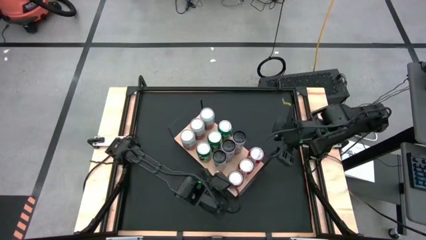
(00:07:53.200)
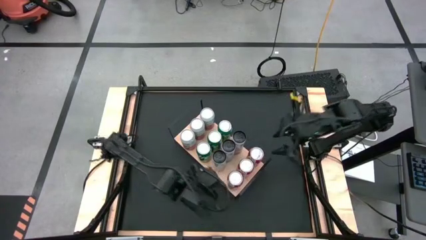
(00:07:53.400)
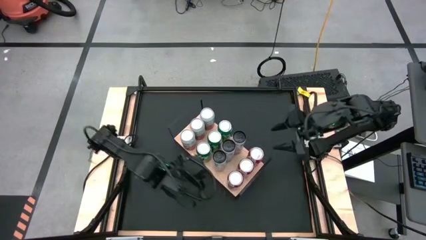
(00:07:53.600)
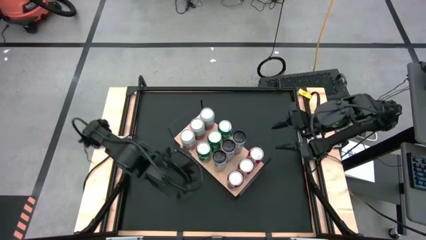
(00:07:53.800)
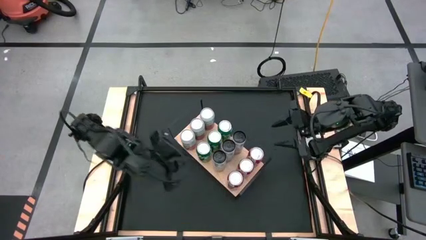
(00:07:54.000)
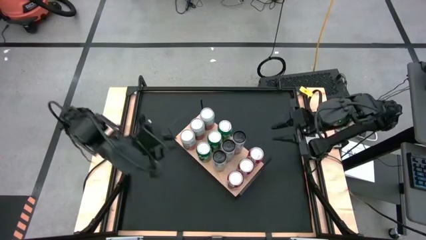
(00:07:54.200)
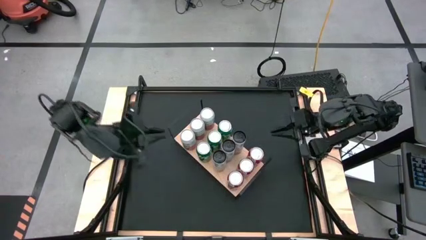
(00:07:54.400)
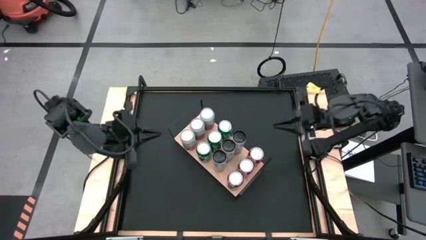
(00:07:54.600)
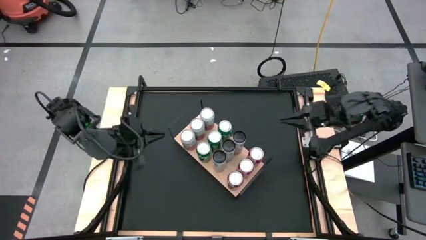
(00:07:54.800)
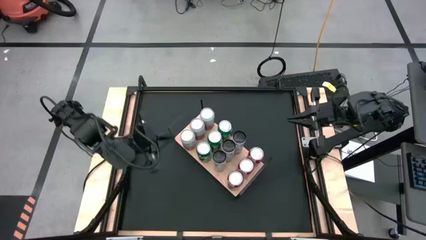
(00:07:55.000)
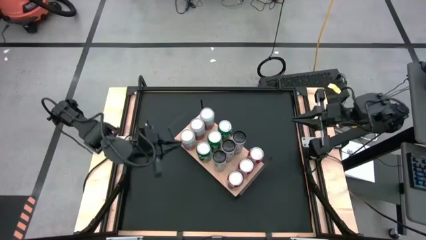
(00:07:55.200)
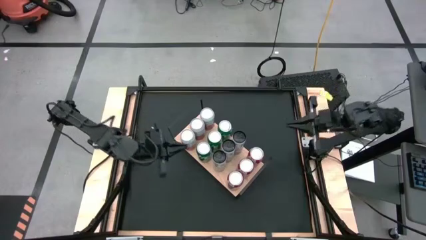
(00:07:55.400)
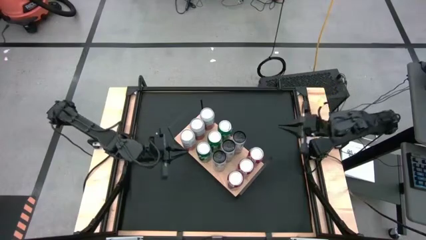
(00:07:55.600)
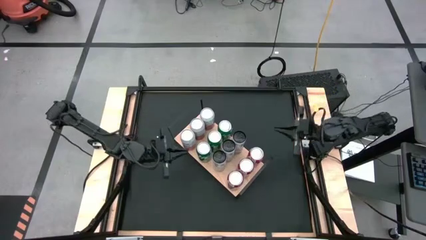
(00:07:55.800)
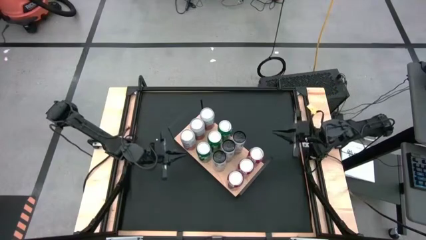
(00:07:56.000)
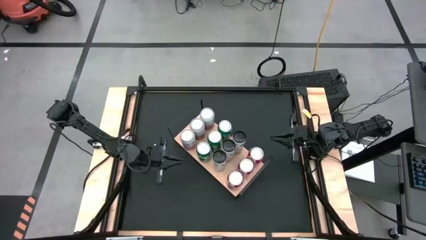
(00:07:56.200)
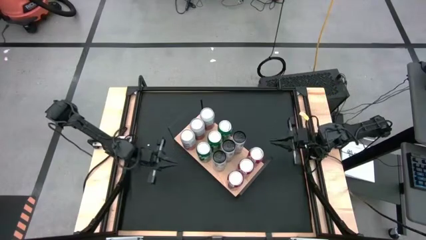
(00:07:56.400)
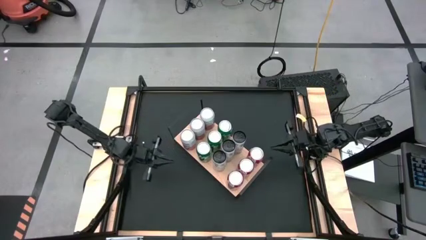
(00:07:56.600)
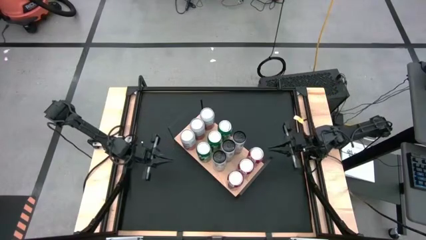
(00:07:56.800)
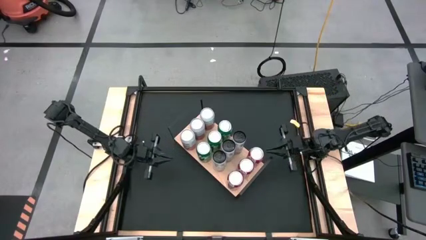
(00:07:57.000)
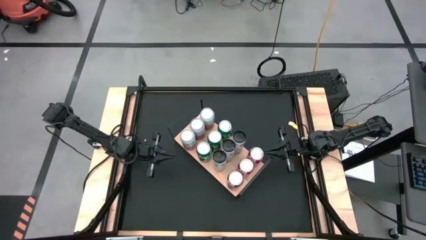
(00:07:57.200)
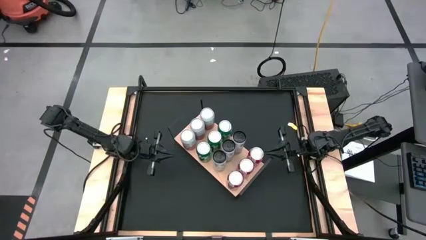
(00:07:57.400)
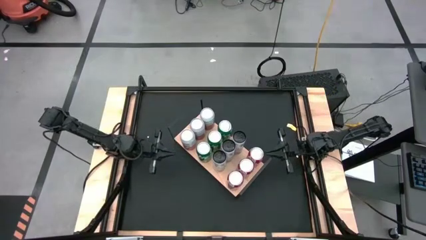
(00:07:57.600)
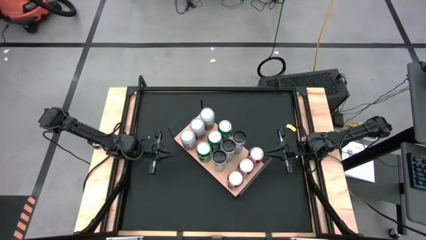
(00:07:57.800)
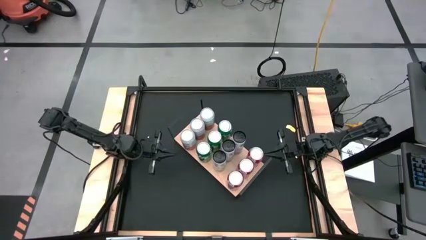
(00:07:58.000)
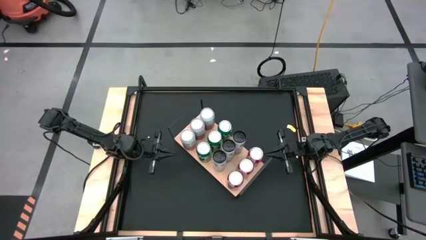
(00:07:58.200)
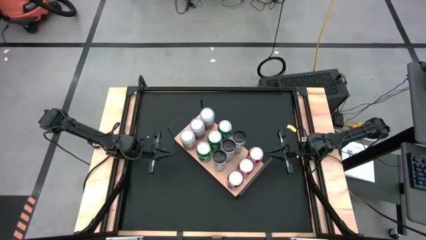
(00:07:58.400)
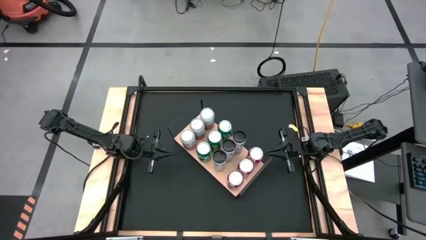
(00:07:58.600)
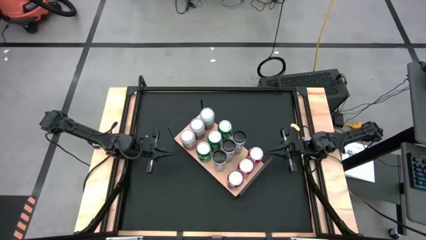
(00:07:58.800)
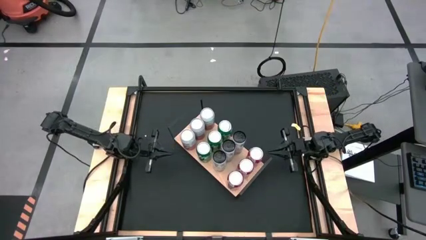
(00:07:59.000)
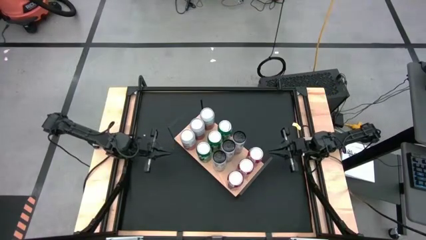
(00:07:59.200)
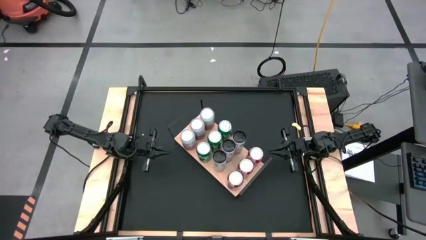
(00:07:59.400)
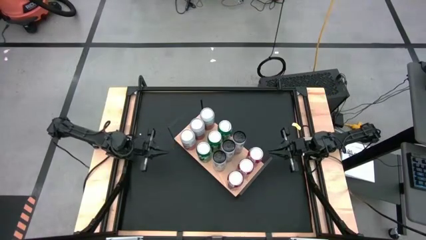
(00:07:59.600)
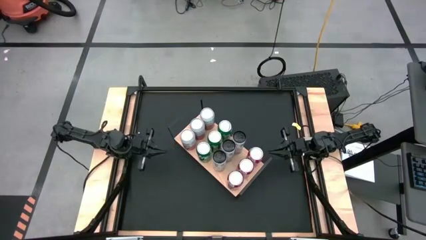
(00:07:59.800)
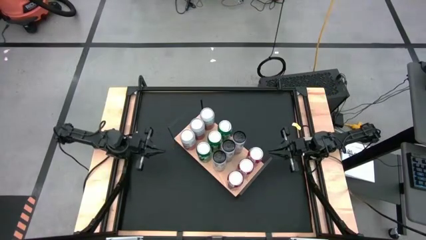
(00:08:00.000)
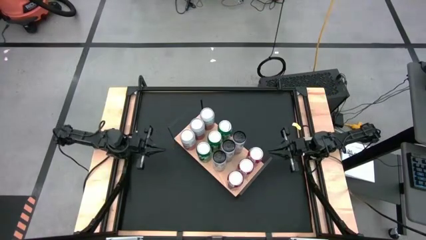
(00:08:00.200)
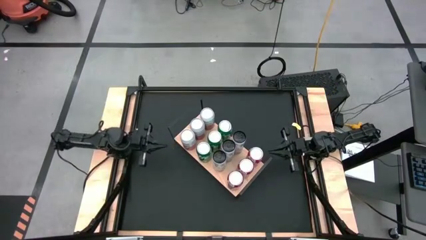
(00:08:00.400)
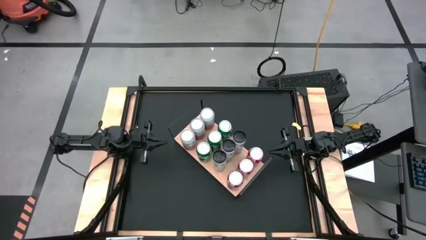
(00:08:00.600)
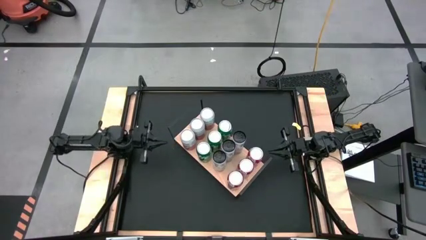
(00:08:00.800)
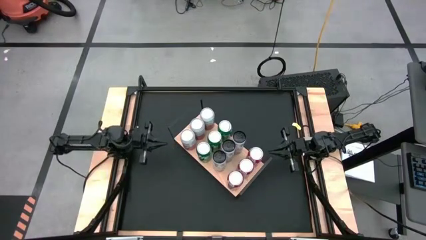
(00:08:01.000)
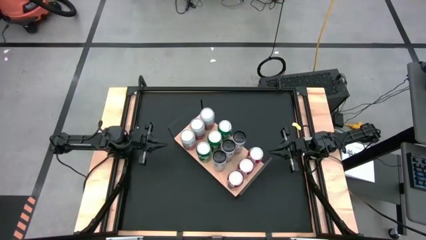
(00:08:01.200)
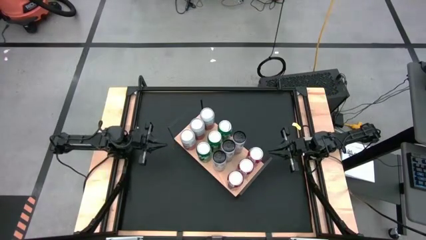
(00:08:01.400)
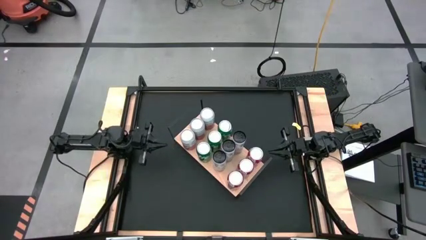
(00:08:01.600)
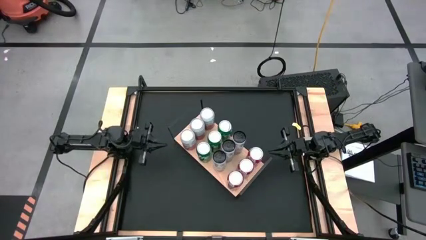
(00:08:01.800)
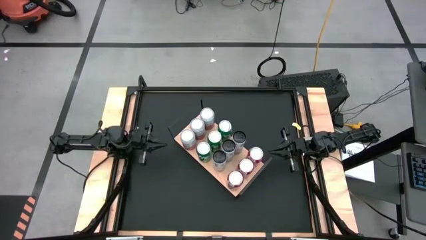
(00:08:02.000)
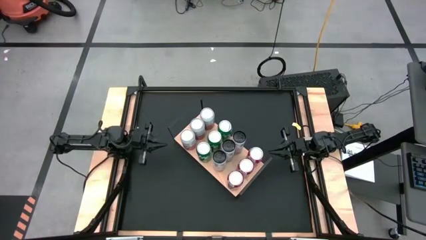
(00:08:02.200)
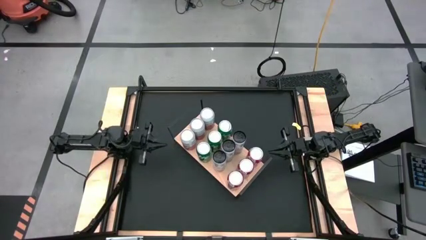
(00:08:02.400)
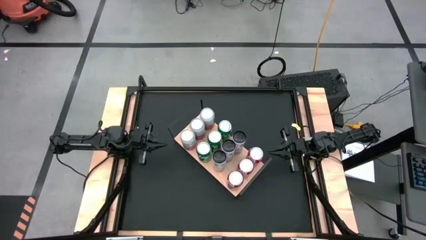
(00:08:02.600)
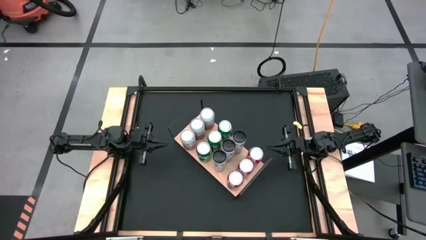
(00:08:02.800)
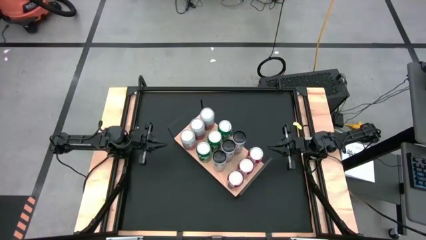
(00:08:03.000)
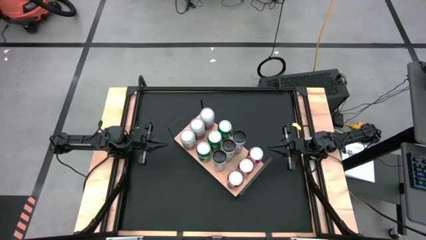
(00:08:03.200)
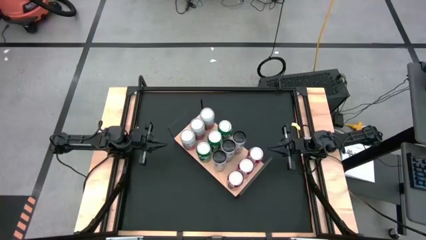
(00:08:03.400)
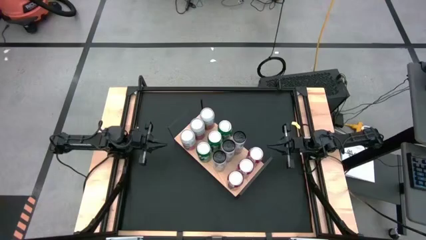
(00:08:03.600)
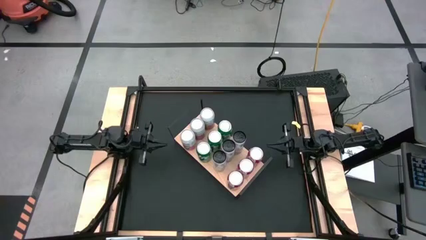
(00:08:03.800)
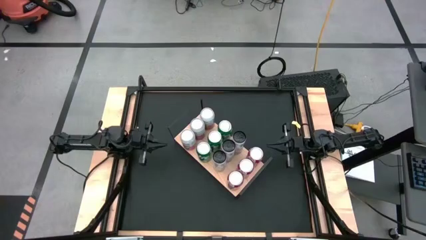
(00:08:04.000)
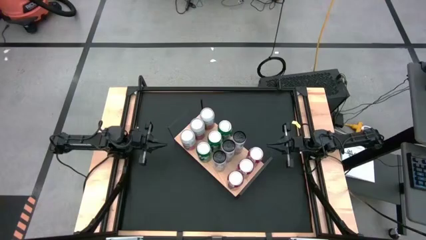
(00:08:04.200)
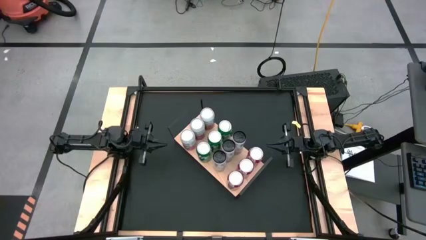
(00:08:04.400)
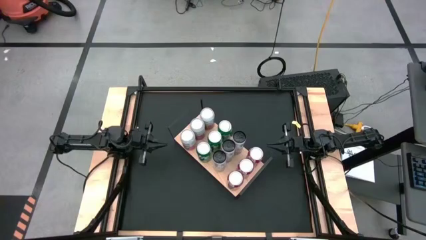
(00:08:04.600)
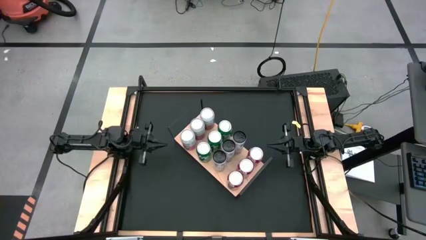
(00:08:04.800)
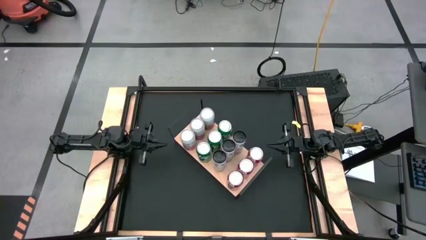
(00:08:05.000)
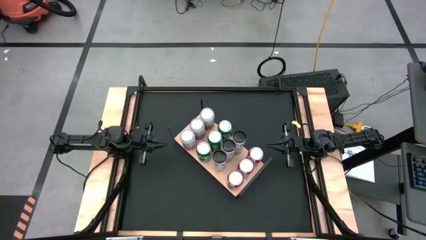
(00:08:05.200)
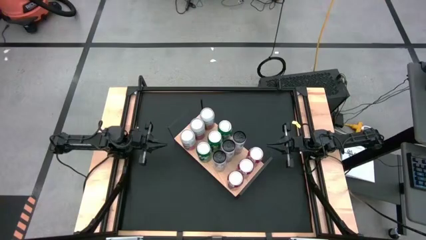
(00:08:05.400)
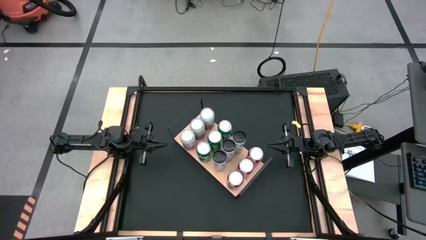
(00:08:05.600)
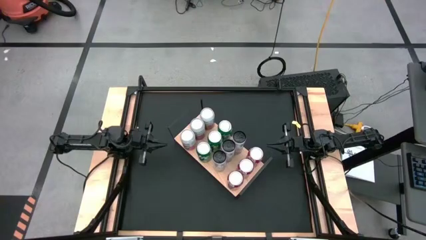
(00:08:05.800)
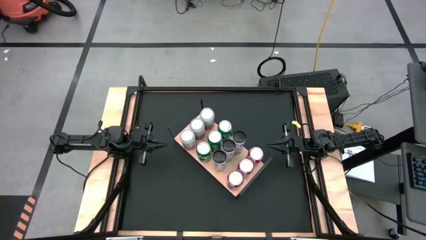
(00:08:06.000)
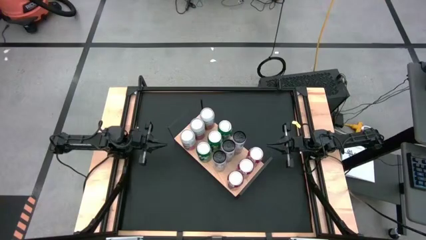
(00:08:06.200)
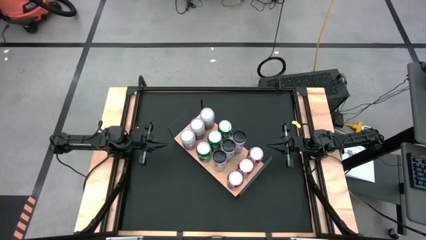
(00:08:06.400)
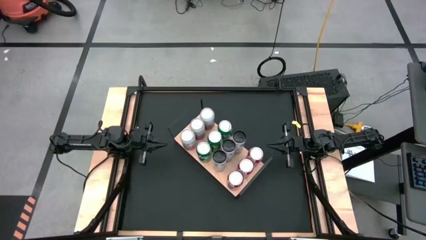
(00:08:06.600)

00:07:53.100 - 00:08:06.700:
Task: Place canned beverage on shelf
Return to Home Position
